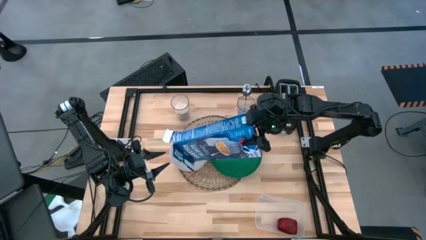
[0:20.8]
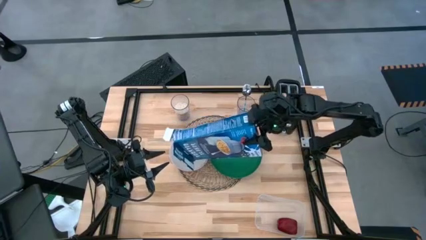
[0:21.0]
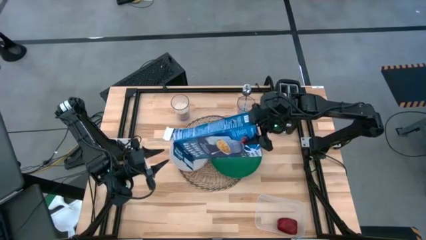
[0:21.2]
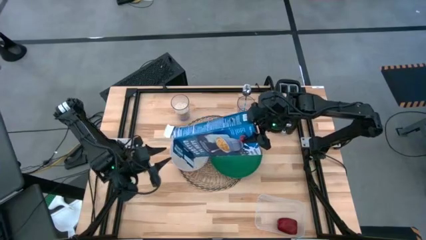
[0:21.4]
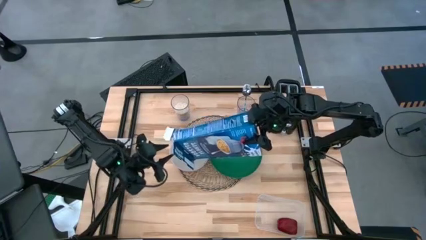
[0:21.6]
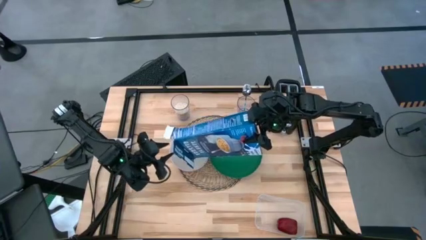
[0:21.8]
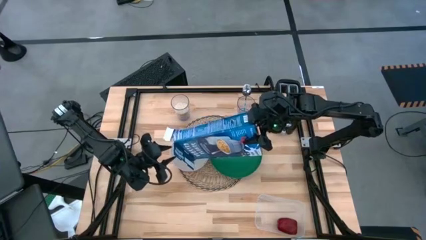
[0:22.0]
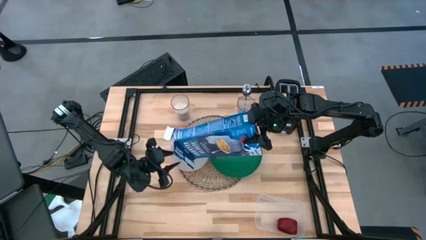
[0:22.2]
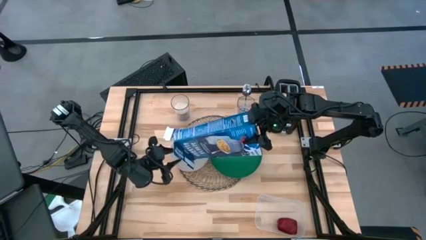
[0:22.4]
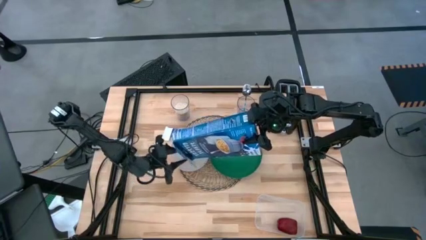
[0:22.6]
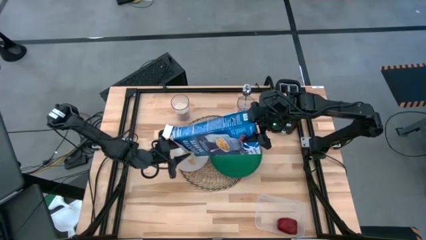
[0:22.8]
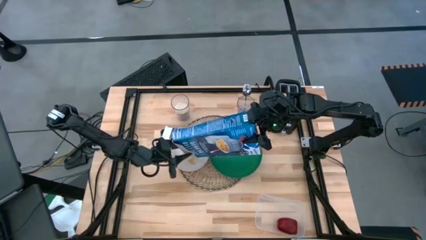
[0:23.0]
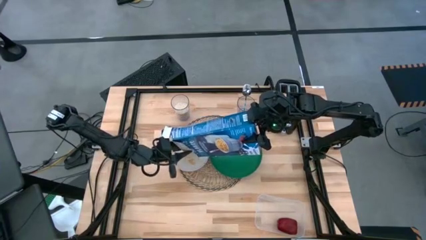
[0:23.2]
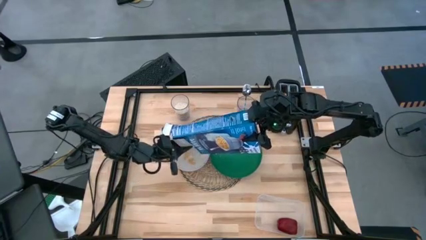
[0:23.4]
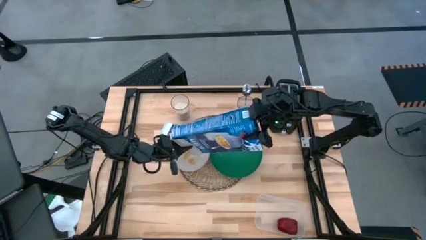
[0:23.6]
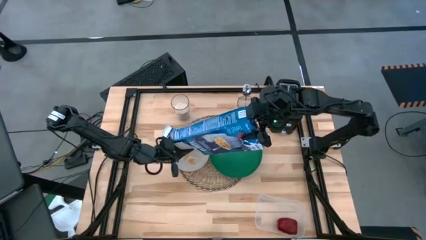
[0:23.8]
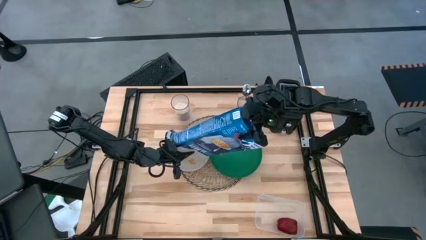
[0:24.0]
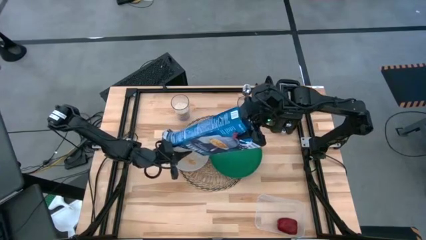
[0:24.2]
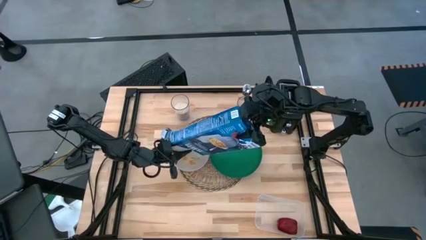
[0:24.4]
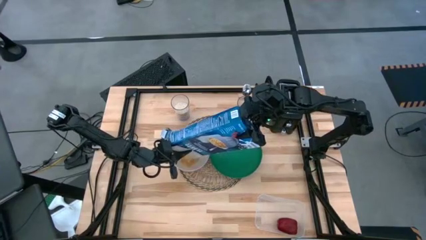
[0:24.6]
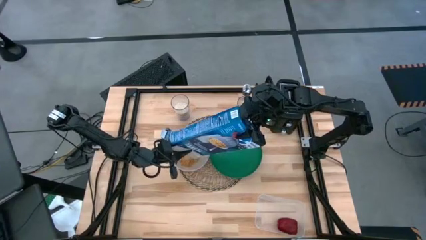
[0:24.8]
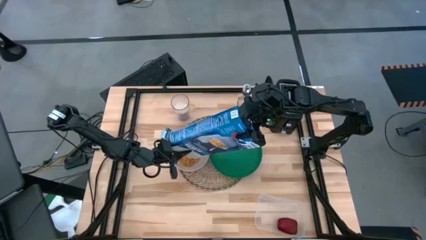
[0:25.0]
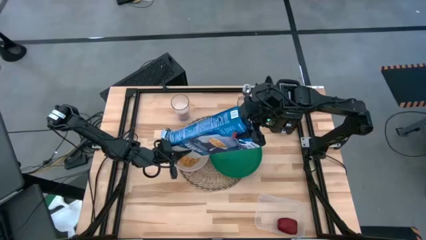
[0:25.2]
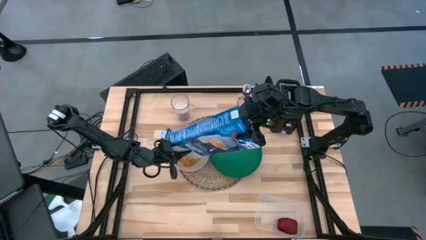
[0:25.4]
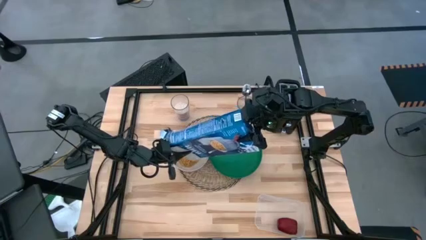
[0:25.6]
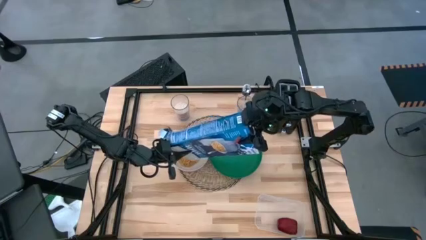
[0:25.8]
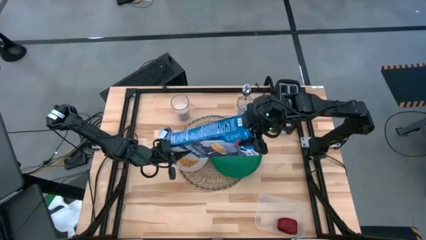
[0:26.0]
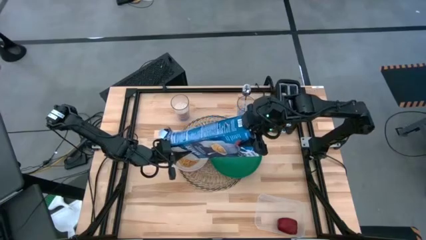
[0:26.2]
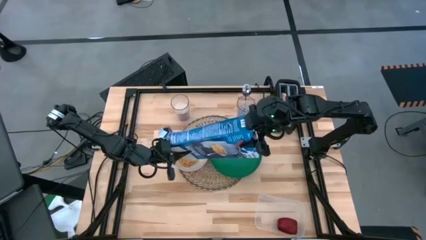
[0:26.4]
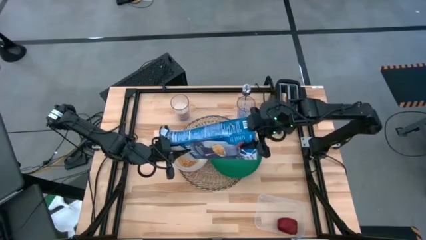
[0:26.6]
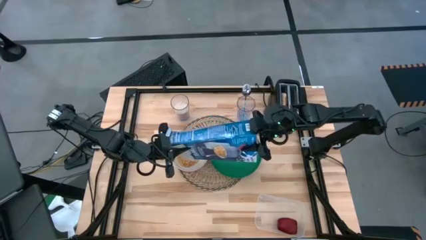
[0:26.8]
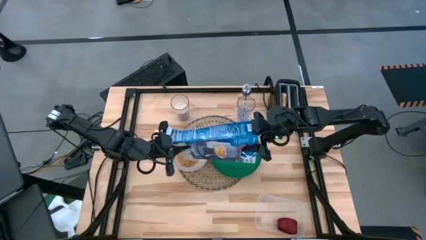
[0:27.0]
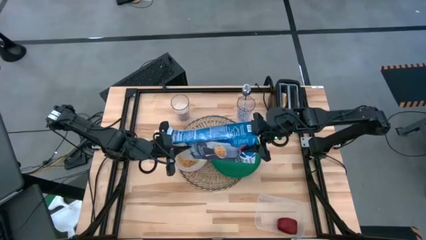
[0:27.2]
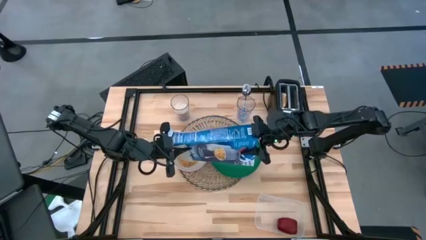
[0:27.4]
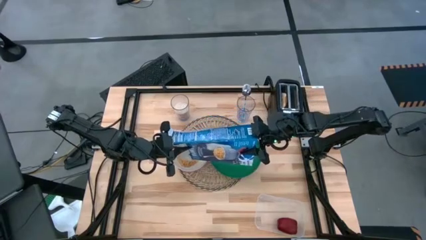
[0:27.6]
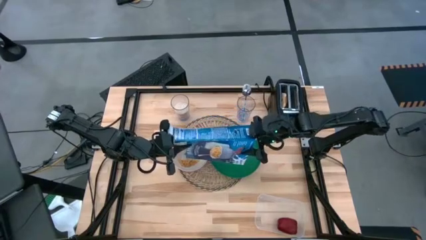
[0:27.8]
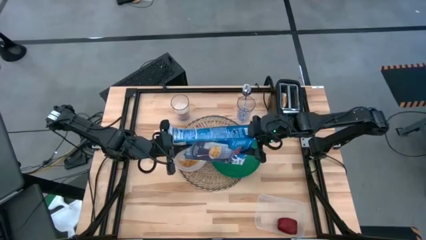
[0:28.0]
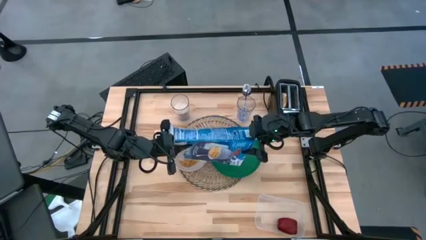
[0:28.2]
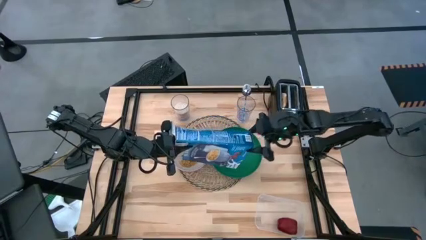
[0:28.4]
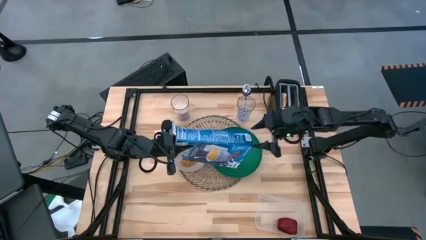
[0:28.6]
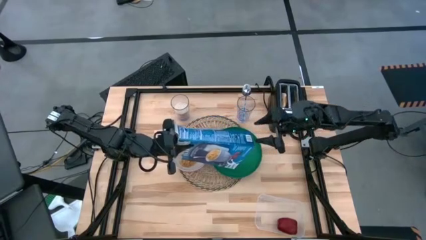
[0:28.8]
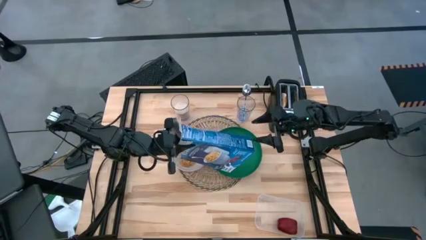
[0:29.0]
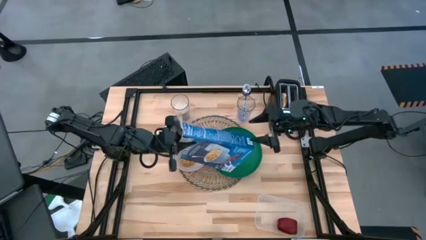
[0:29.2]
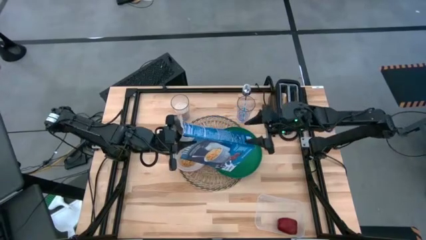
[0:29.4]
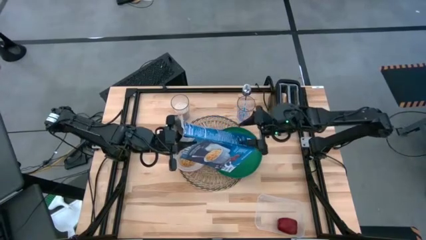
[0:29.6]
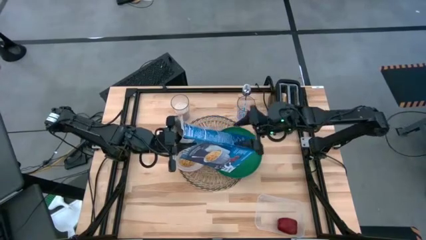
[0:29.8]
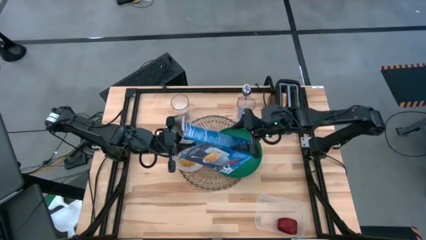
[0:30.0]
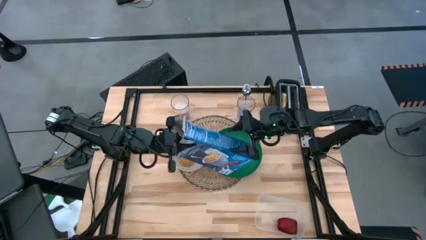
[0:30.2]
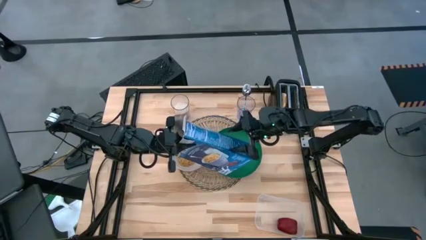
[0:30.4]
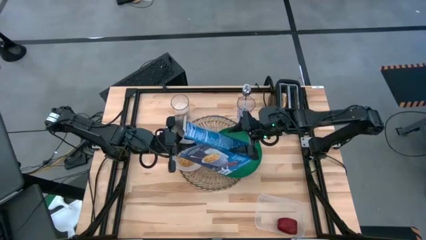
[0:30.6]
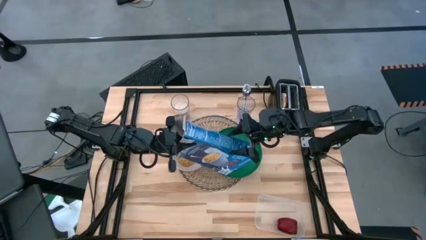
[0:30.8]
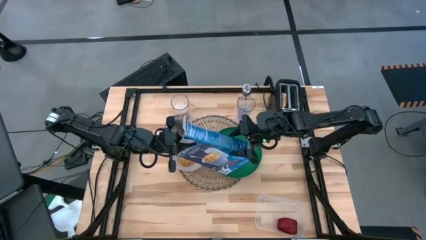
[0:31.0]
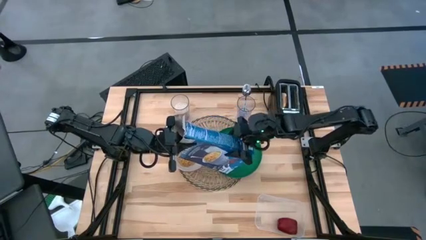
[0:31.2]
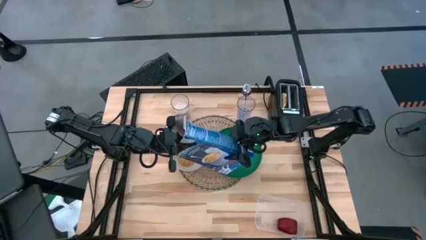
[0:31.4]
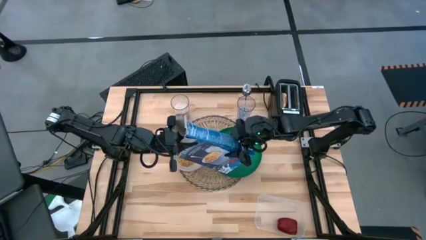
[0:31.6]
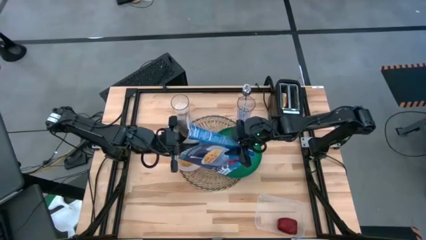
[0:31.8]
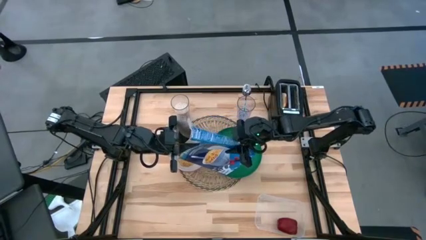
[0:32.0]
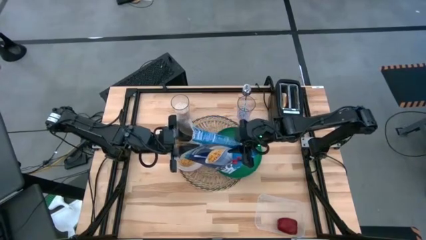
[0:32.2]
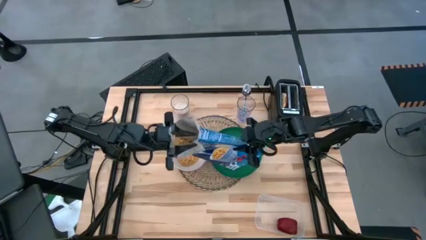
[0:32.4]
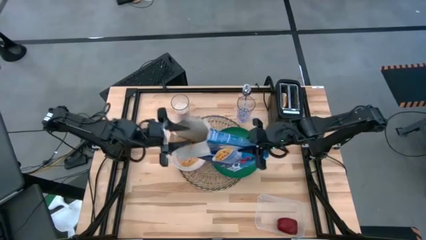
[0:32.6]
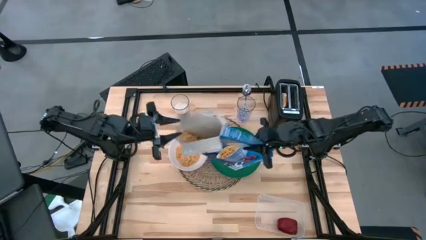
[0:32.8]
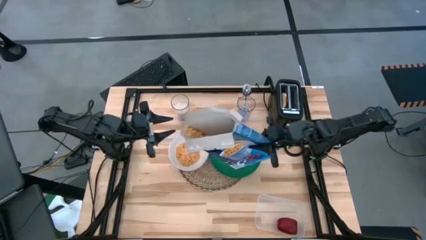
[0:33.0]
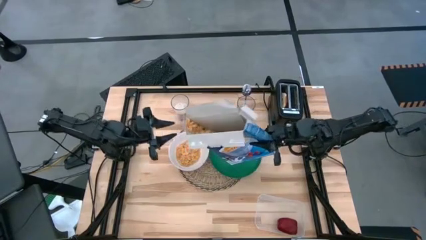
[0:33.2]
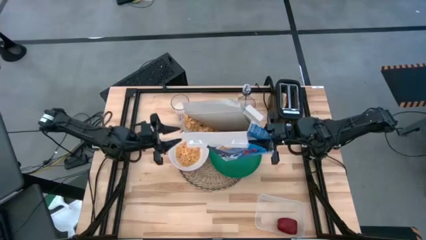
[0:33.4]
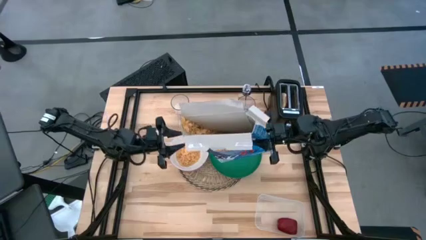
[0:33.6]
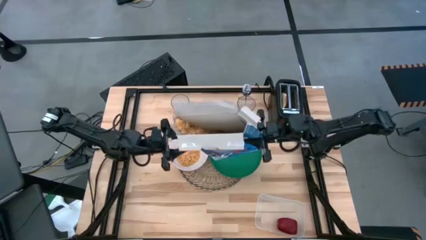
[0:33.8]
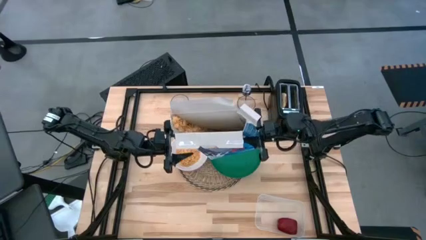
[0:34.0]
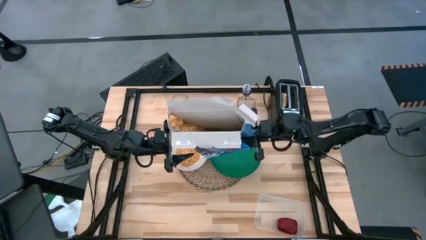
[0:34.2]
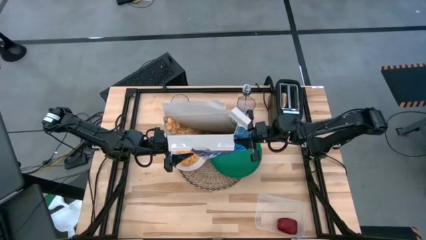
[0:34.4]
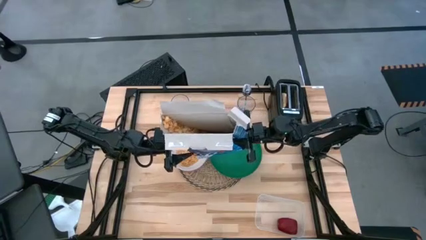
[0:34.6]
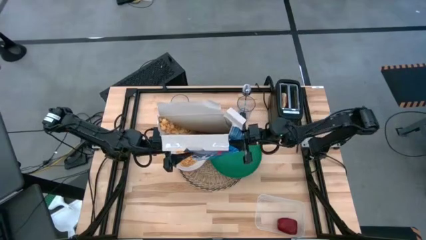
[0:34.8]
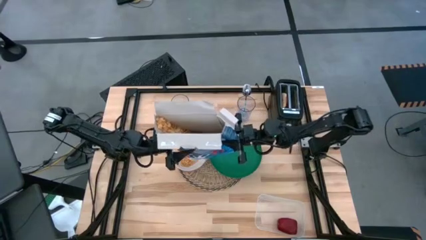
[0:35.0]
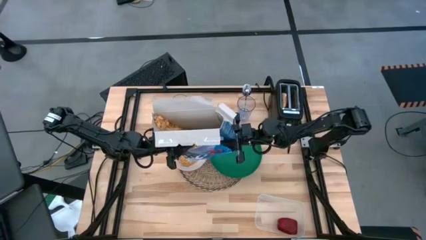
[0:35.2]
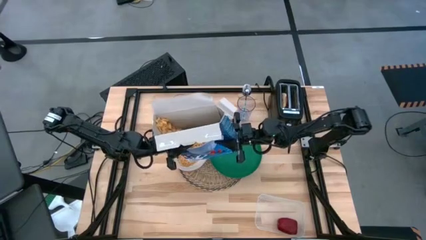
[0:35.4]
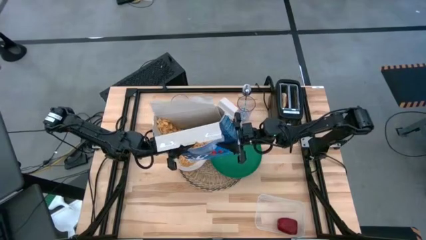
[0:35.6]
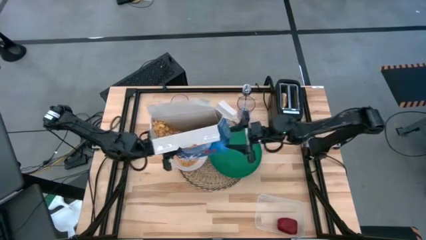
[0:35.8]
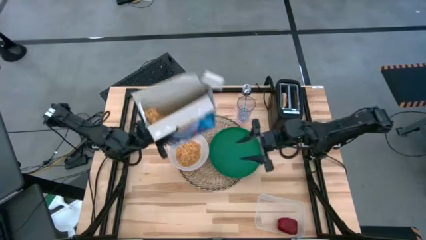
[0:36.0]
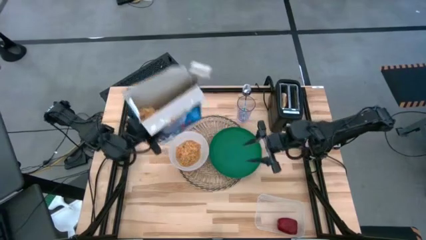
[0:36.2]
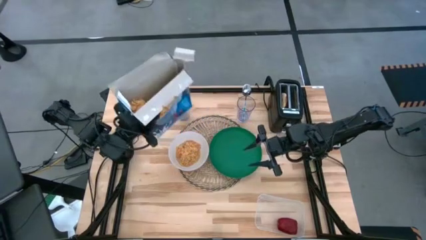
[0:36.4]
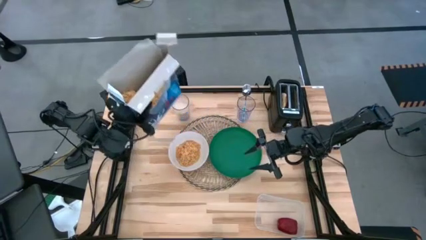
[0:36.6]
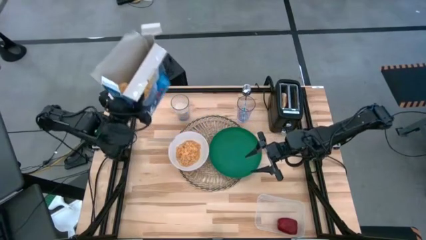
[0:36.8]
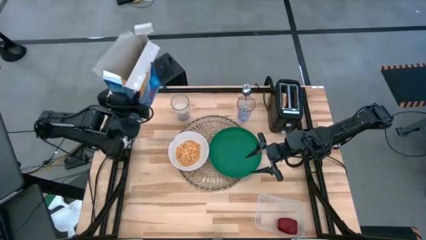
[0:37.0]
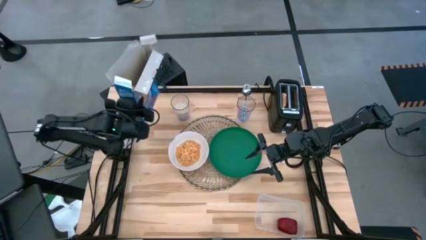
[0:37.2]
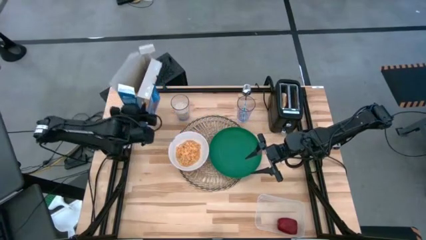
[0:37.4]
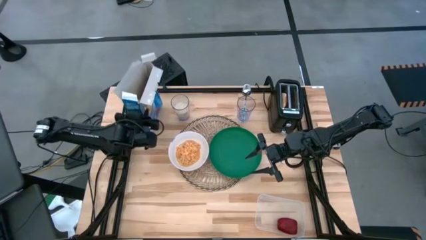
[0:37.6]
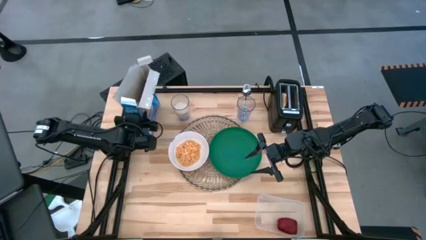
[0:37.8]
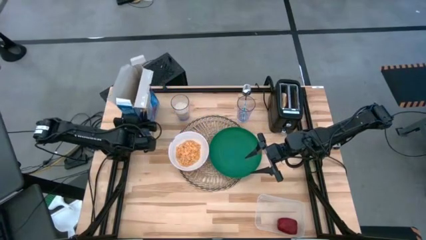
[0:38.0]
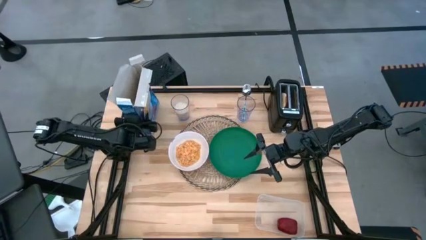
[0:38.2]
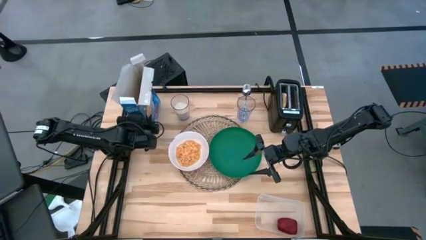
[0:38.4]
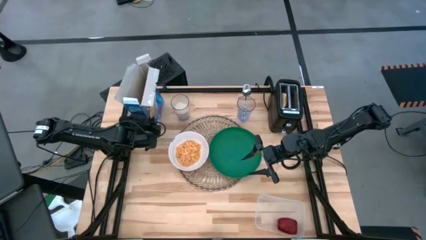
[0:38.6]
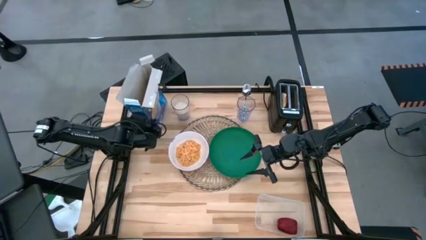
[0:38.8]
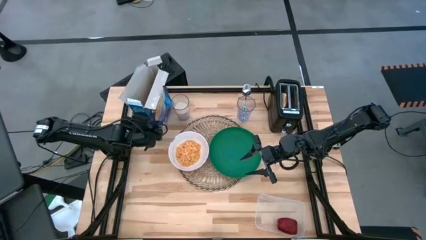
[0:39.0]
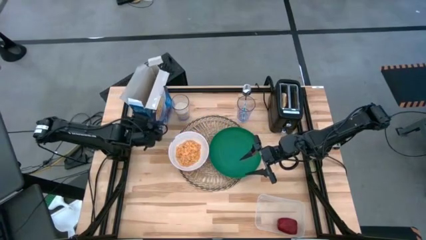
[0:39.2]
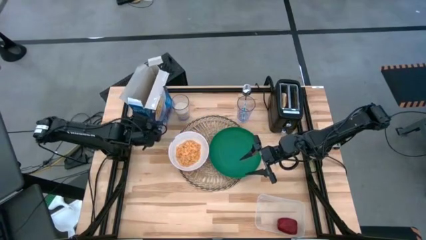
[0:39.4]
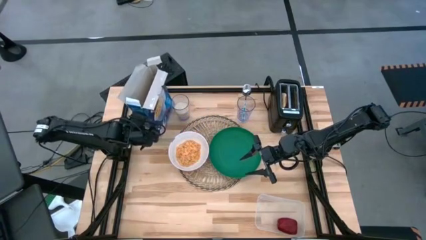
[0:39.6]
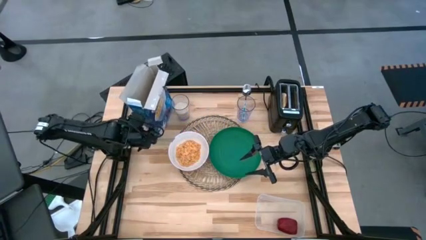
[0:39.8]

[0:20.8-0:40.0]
Task: Arrange a breakfast setting
Pour the cereal into the white bowl
